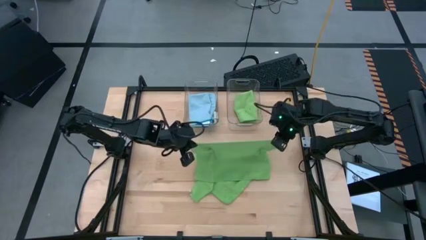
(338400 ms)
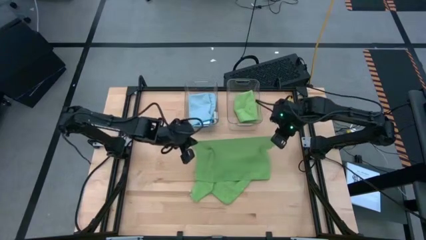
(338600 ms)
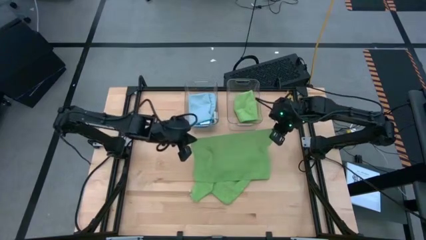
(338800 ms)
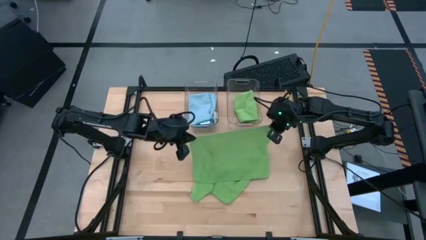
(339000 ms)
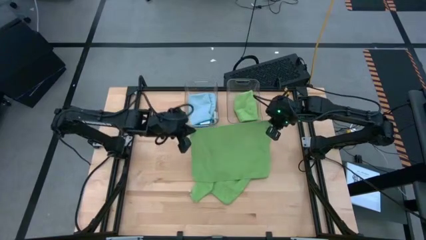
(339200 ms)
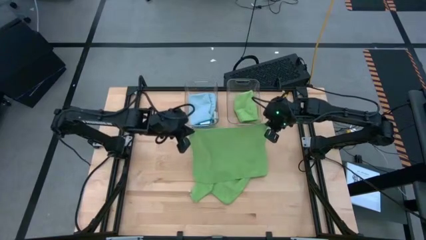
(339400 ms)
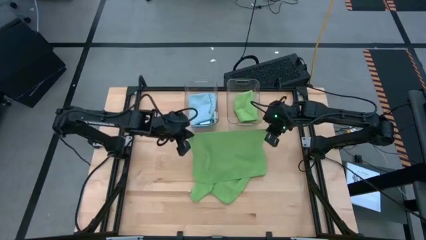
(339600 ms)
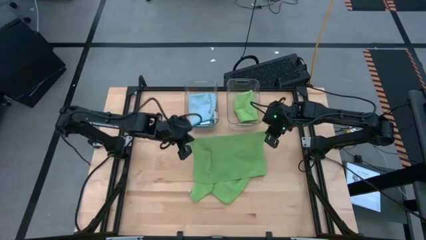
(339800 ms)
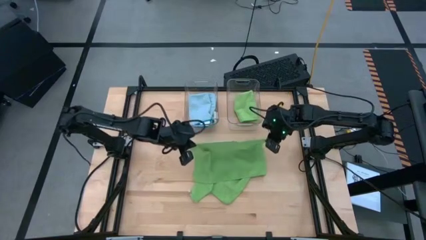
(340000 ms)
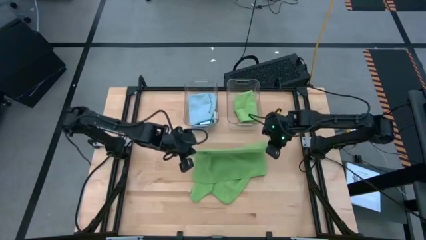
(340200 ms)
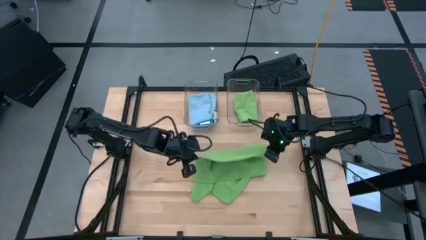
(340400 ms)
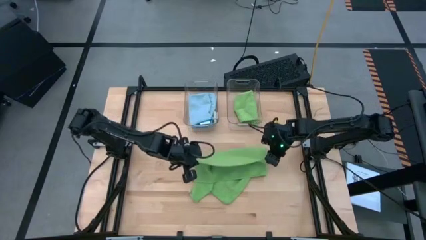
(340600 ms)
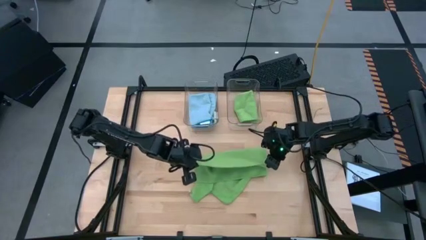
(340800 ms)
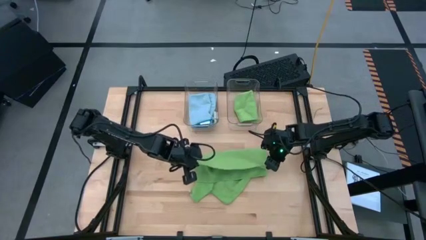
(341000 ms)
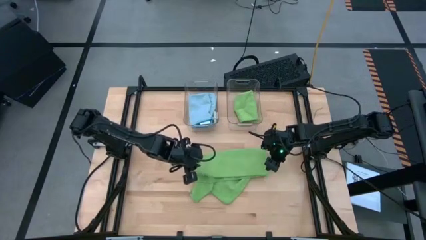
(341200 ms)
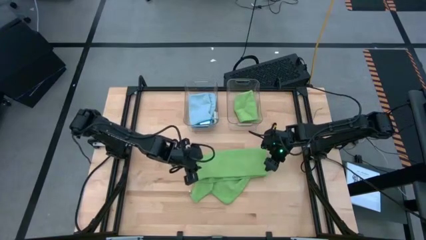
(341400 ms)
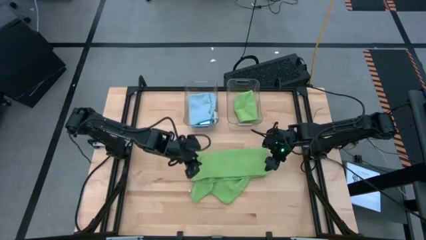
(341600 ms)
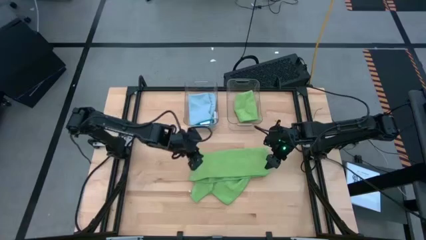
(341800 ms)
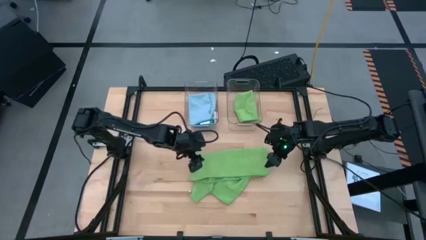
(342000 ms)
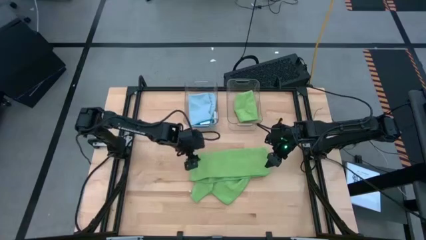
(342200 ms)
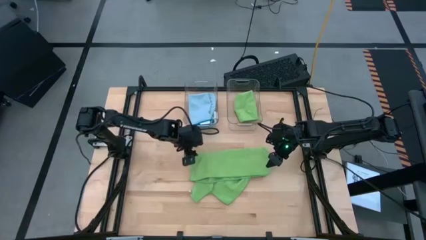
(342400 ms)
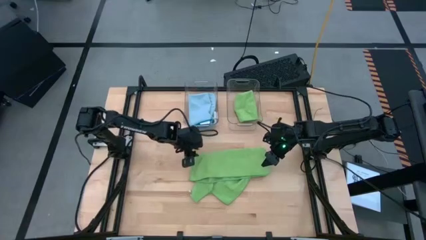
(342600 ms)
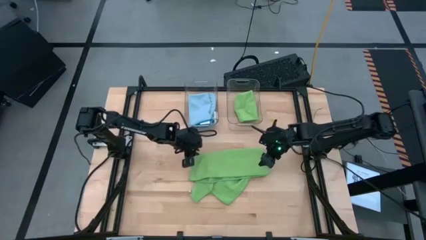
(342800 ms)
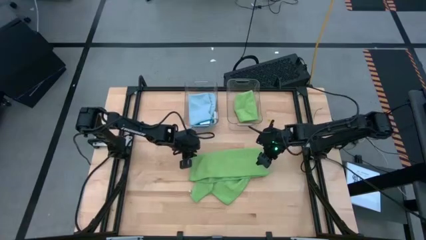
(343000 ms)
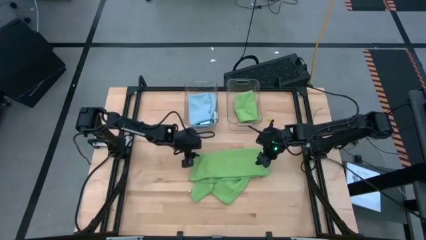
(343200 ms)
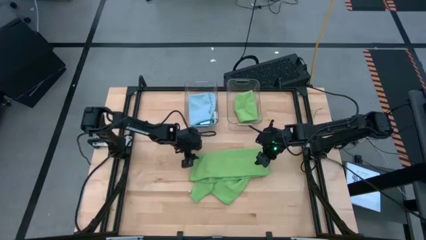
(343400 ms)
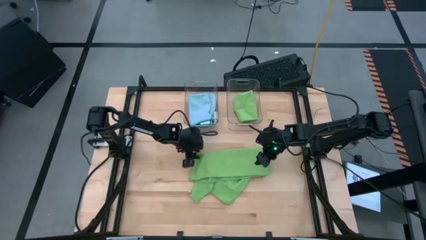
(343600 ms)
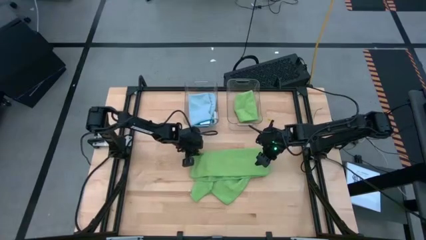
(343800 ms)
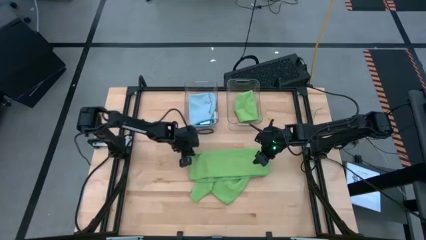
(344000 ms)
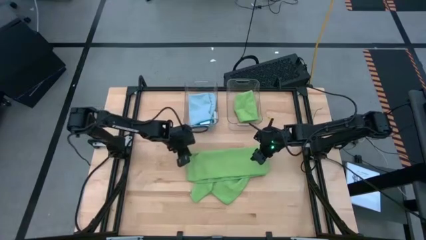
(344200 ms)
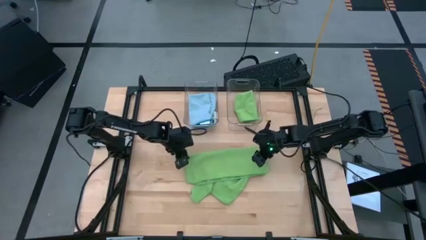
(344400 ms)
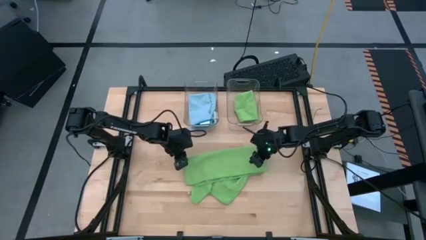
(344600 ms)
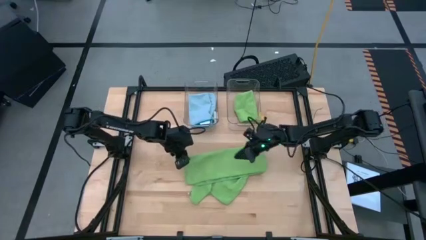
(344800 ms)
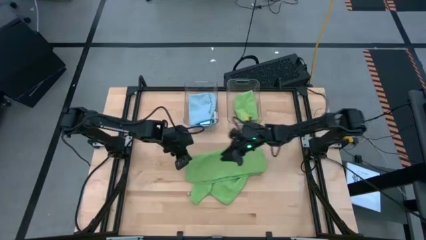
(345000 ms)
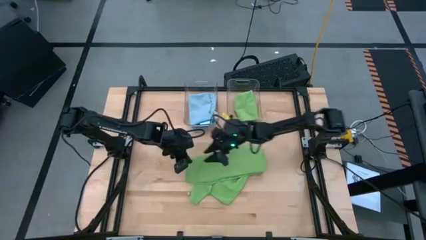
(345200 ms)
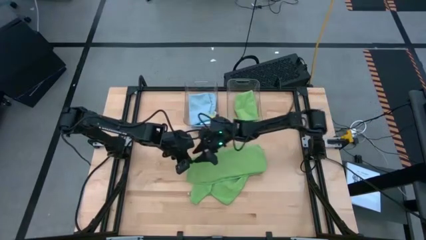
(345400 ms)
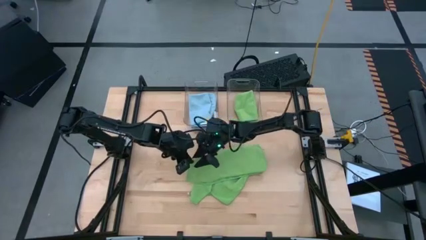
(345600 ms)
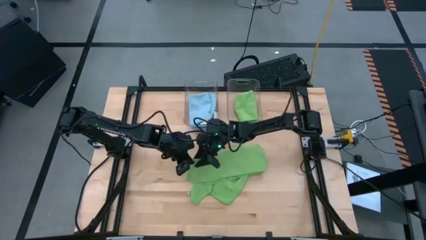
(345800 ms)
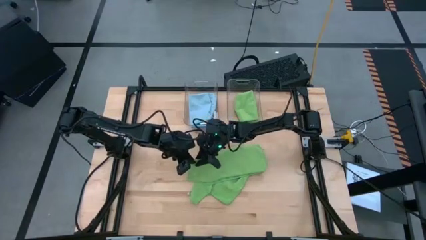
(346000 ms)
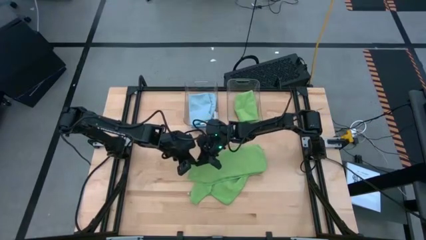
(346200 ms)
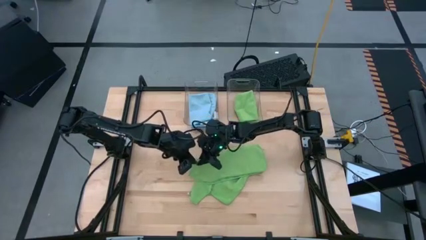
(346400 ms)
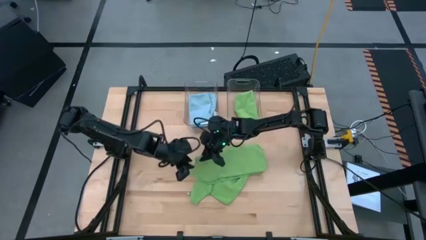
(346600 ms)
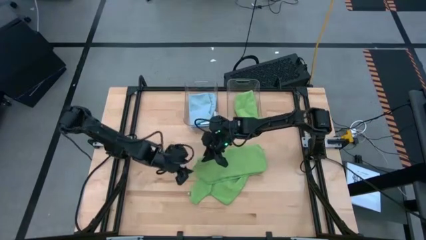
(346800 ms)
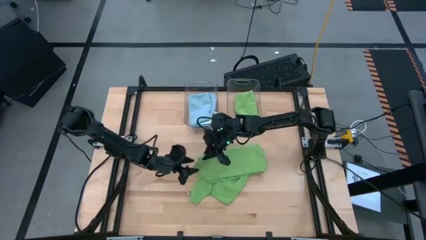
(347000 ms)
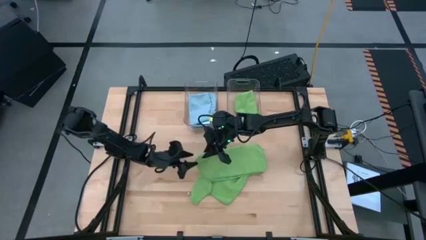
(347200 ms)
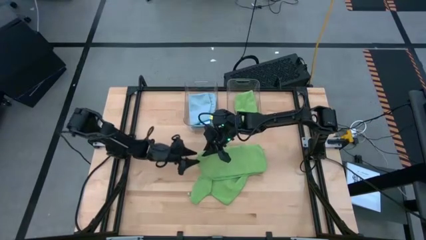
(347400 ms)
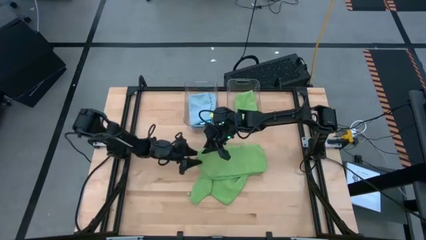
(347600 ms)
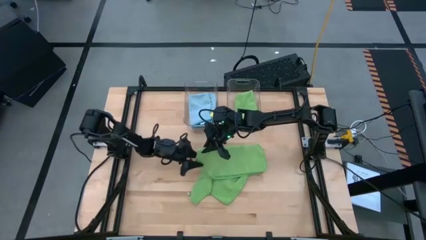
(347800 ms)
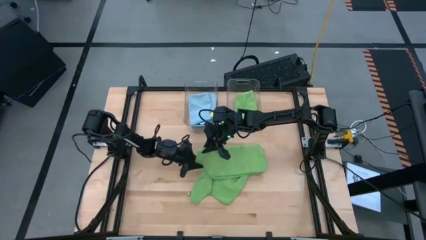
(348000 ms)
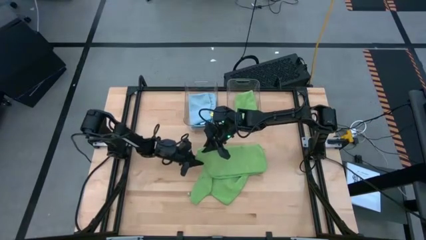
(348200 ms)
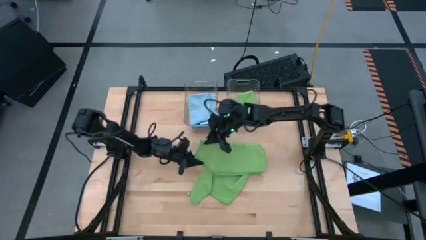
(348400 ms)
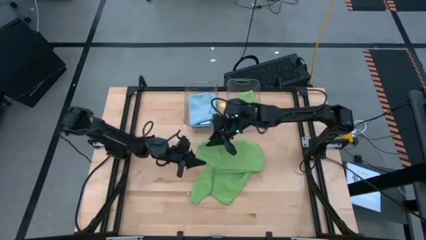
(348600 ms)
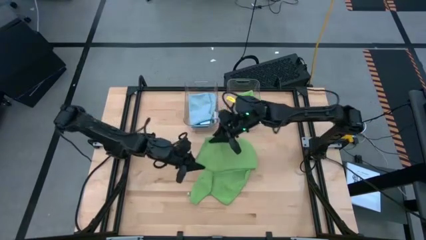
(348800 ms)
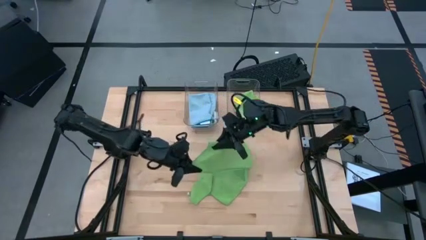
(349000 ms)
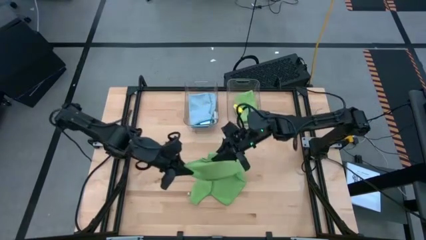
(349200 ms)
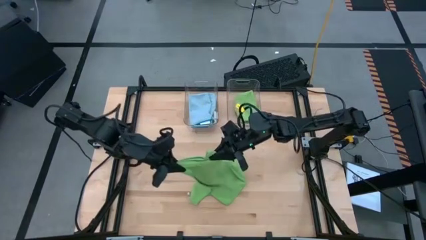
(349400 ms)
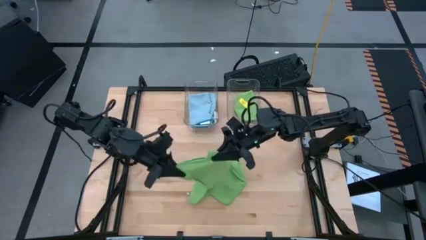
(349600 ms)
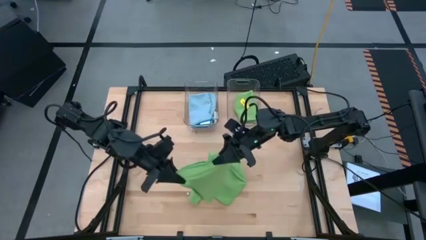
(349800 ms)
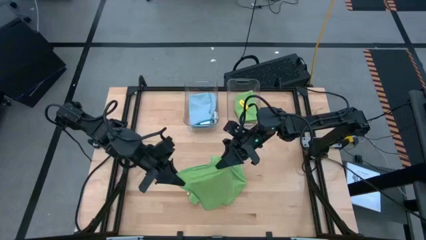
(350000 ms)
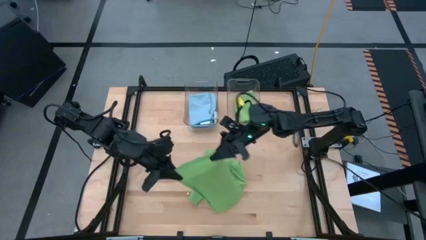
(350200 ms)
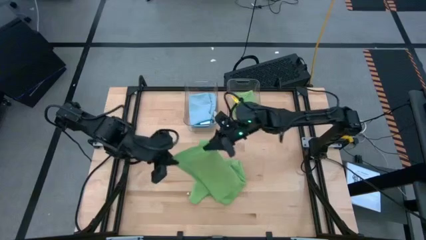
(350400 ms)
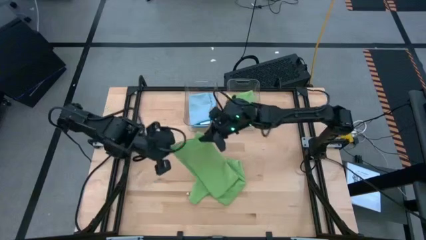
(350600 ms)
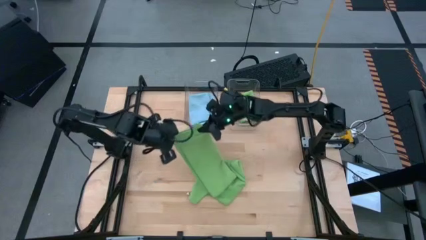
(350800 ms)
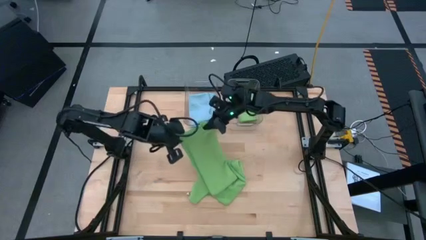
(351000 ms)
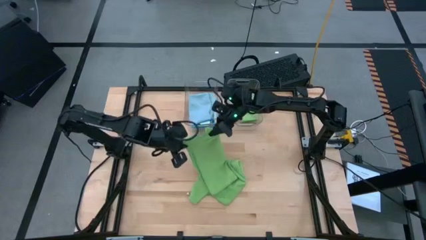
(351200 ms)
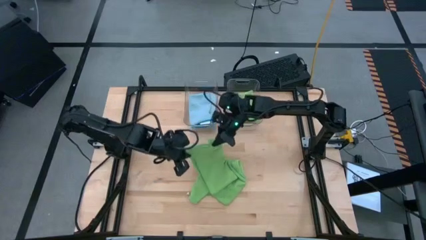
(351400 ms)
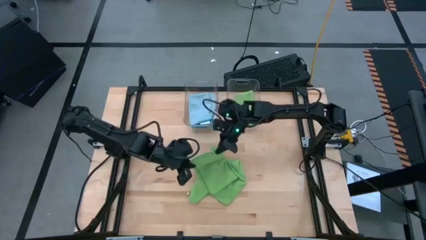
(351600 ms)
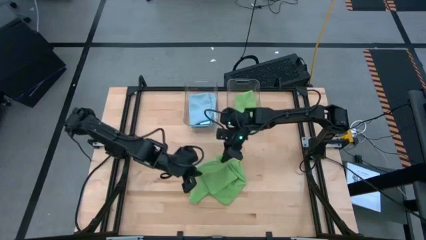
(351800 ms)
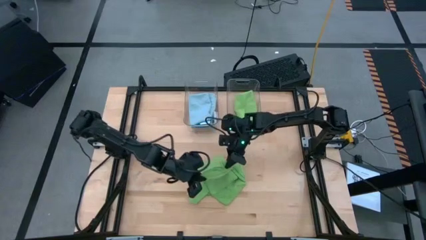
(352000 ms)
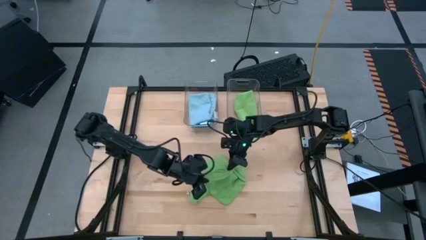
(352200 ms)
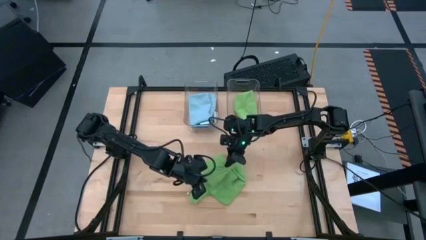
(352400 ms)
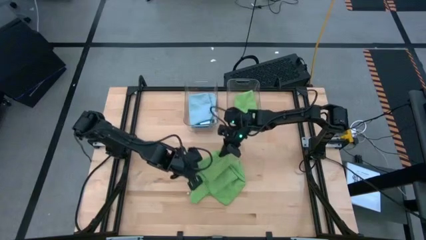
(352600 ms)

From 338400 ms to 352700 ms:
Task: Fold microfiber towels
Fold the left green microfiber towel
